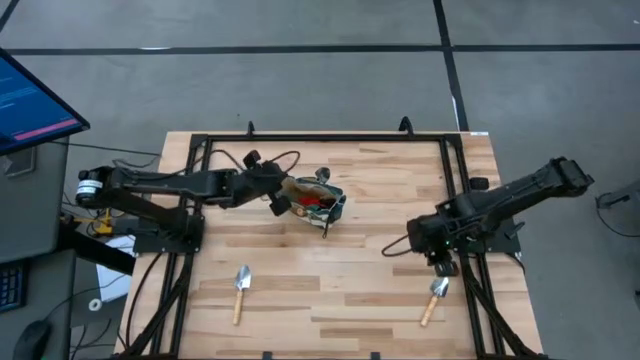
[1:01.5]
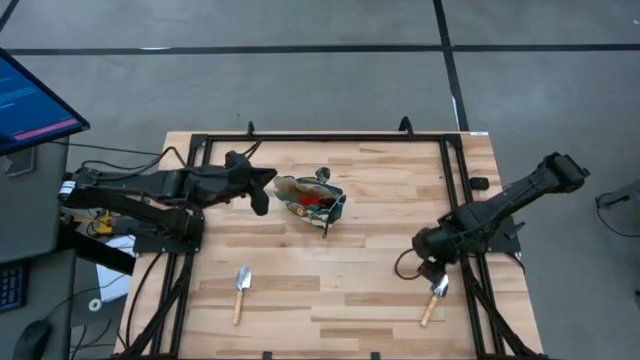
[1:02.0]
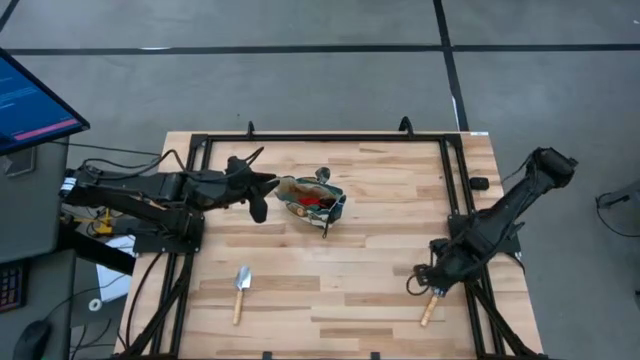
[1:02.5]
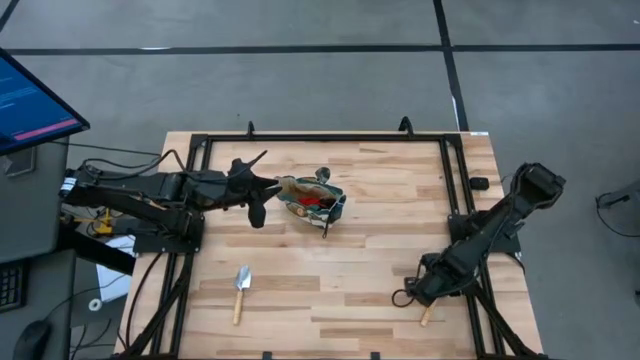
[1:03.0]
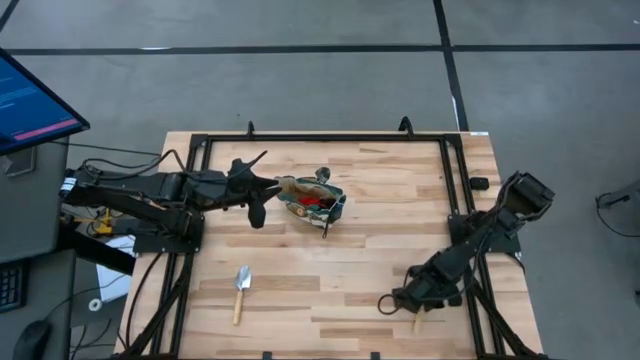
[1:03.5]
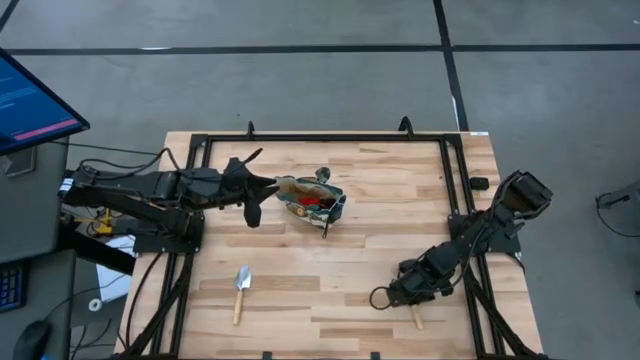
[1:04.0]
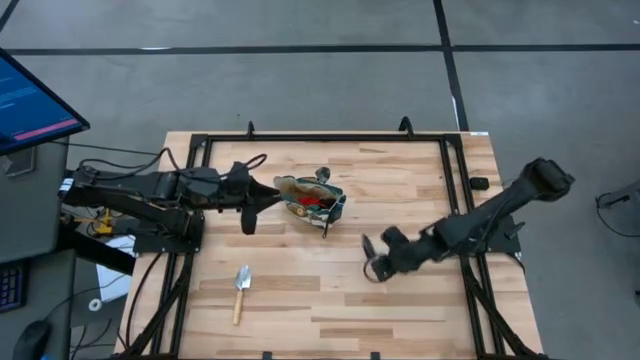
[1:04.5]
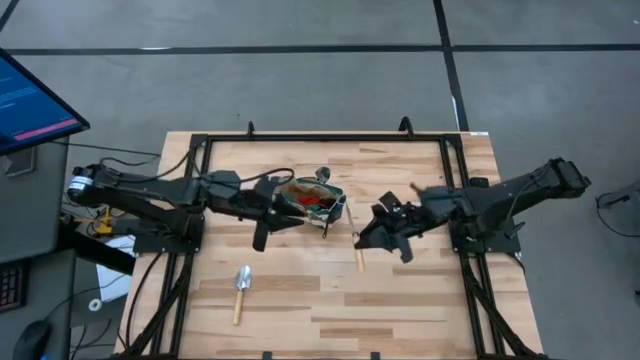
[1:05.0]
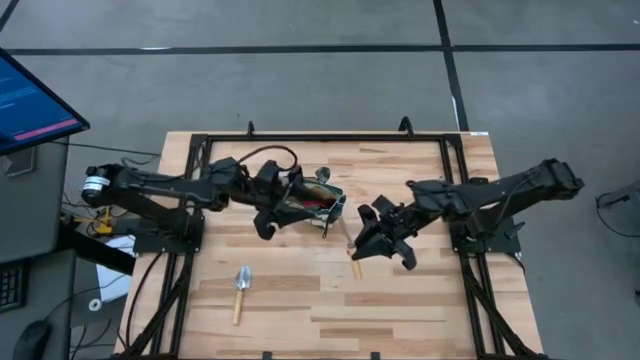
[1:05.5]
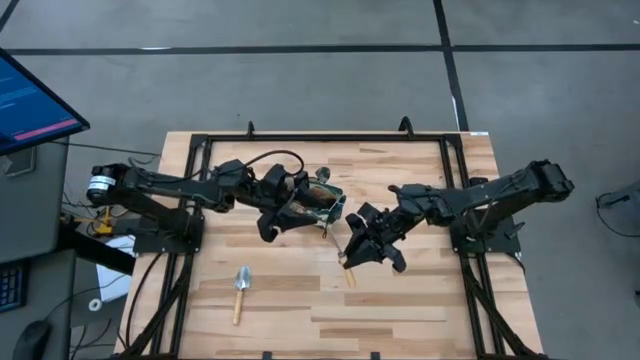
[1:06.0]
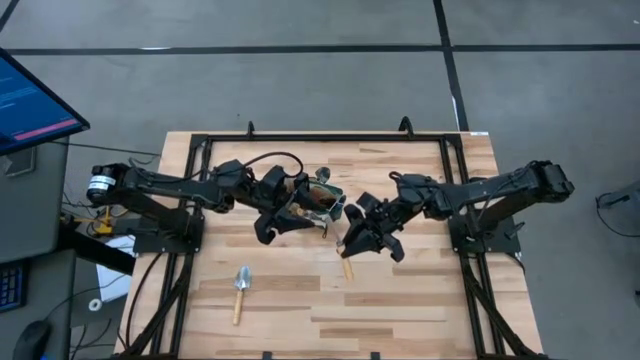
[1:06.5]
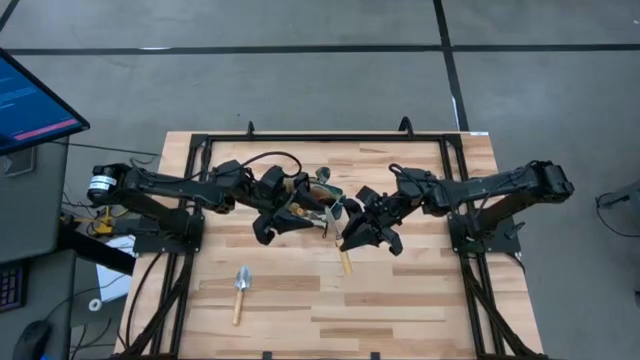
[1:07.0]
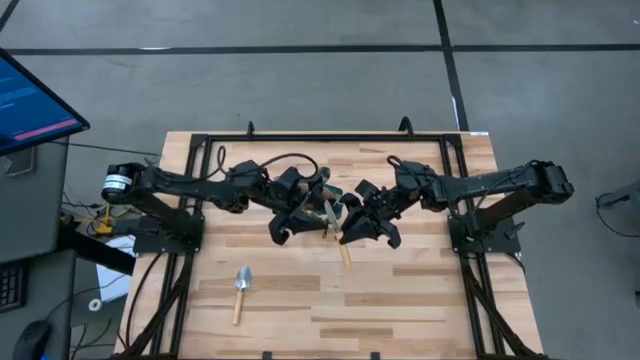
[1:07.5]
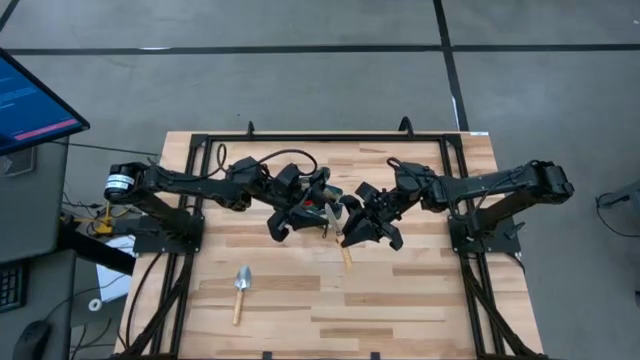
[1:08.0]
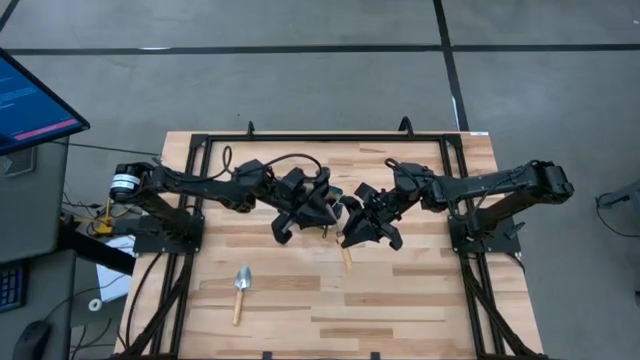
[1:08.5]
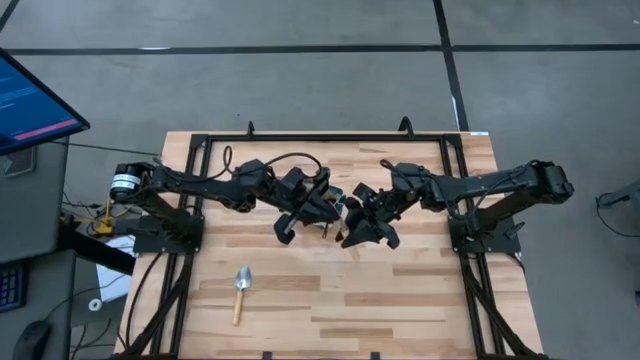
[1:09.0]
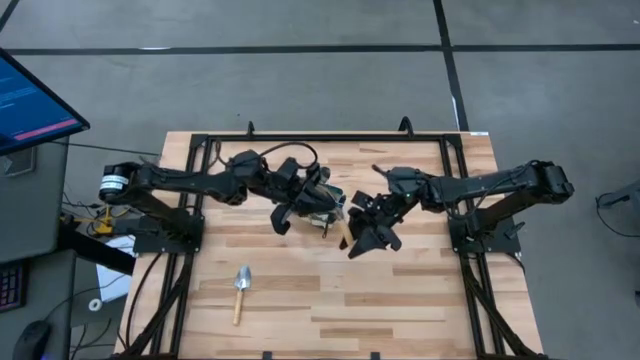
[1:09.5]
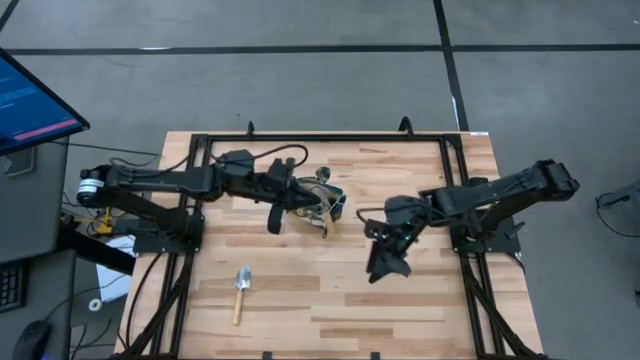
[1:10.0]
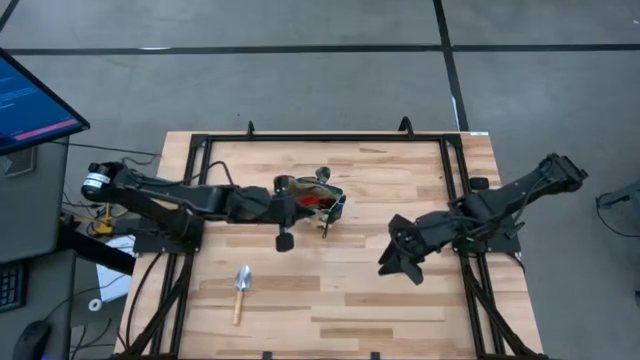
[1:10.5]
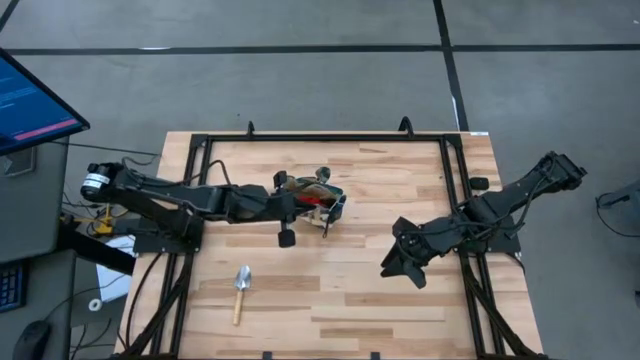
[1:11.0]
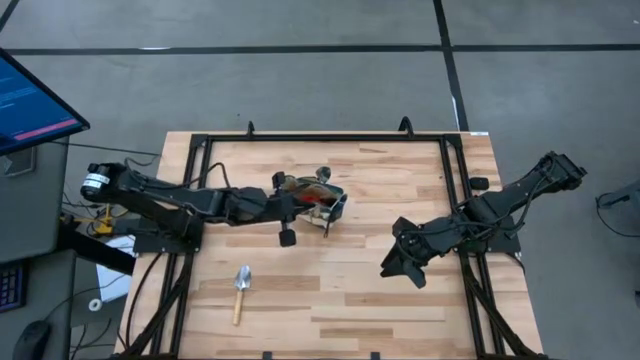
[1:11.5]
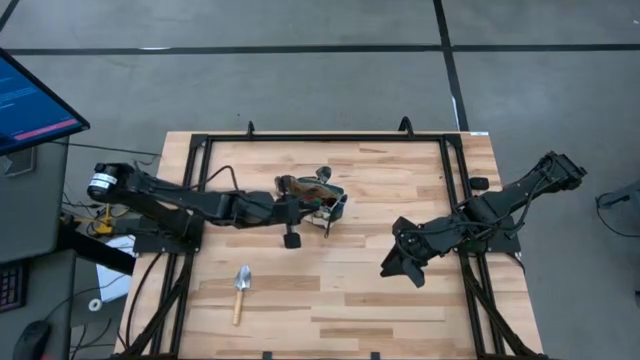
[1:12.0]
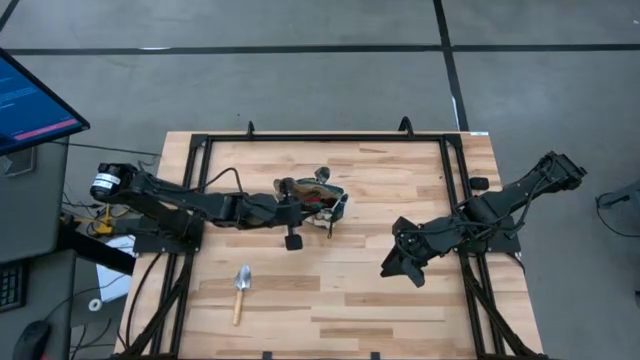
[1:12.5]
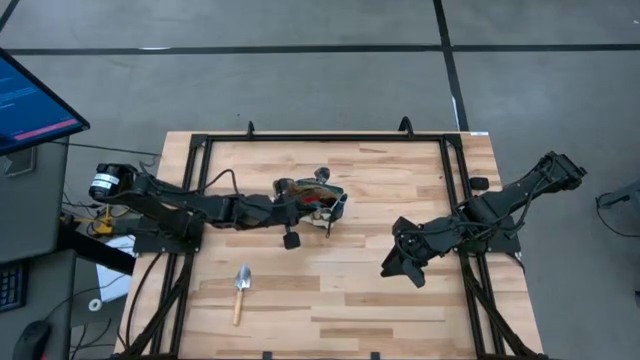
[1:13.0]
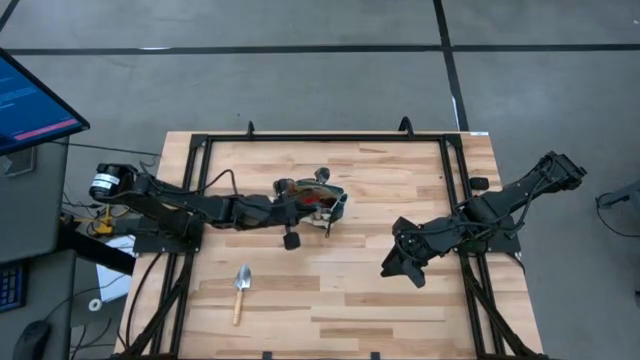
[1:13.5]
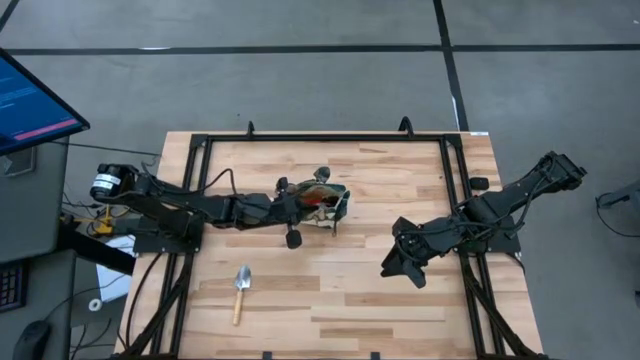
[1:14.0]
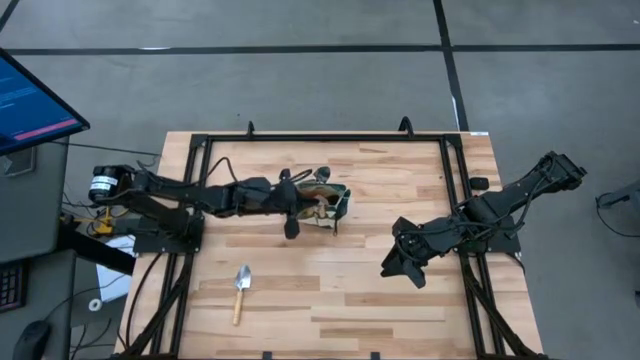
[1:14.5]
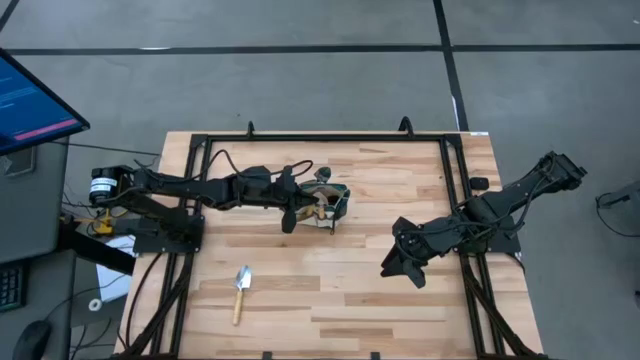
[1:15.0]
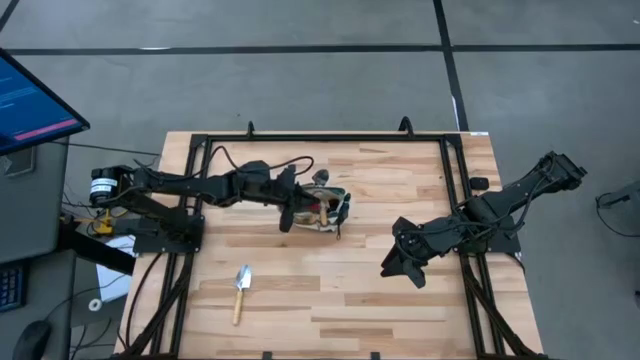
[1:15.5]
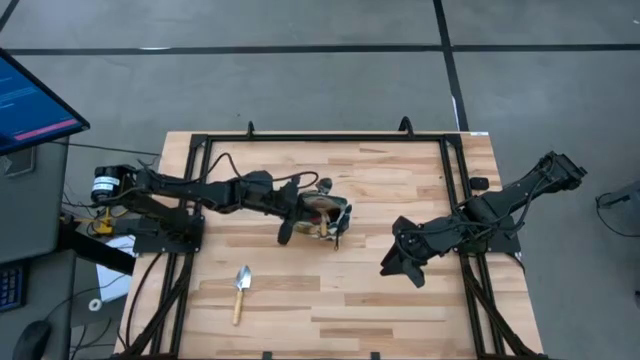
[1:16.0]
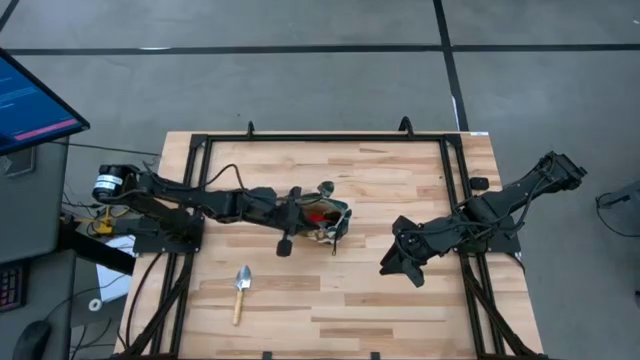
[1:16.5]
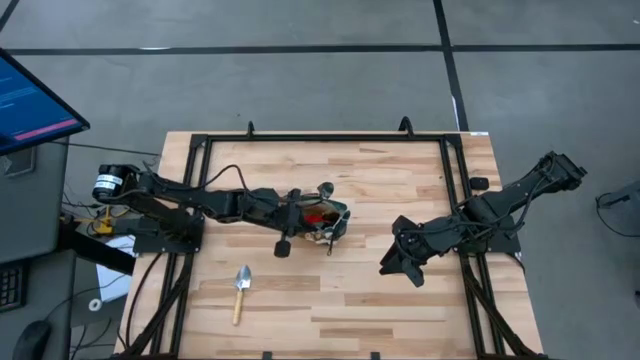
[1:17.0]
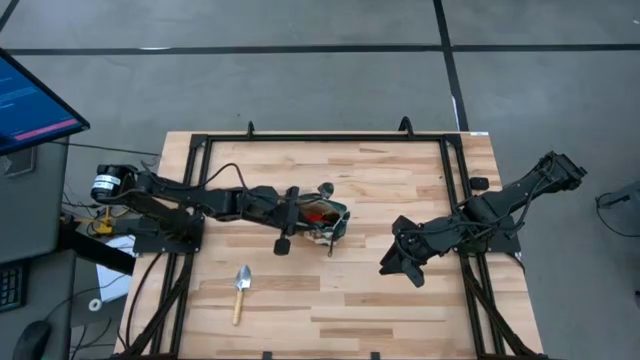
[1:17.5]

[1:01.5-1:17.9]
Task: Pick & Place Garden tools in Gardening bag
Put the brown trowel into the gardening bag

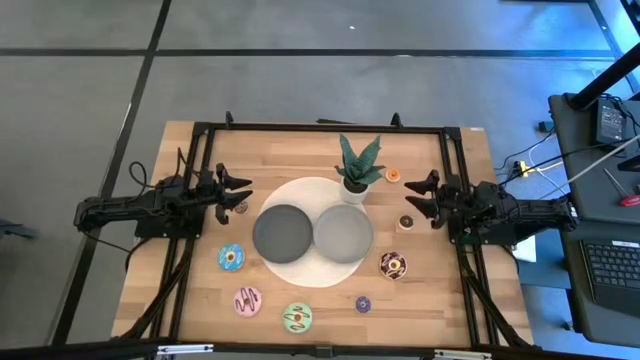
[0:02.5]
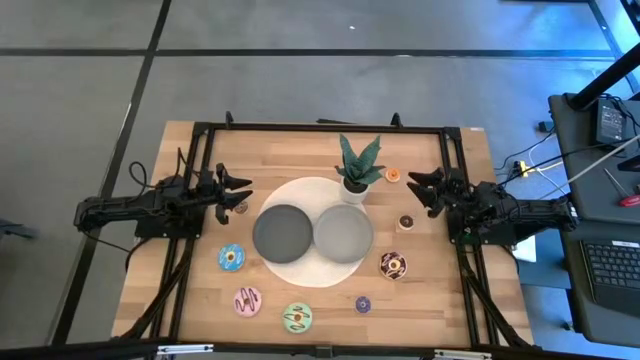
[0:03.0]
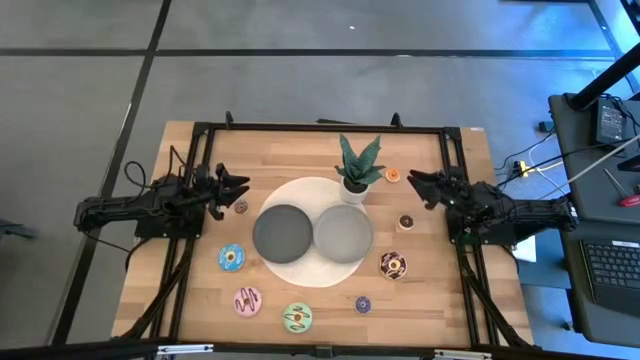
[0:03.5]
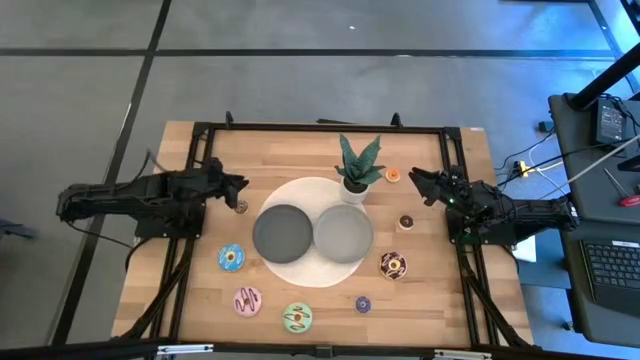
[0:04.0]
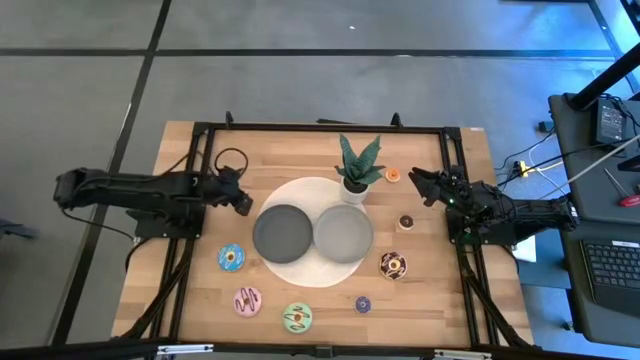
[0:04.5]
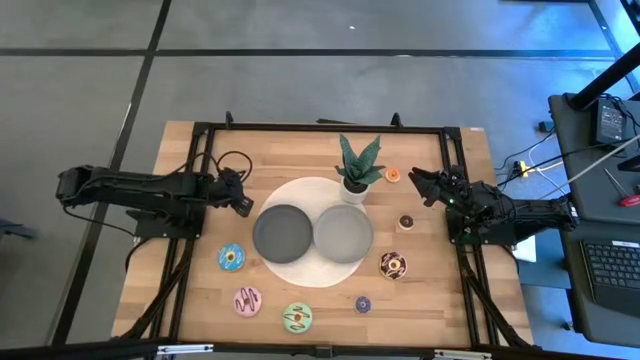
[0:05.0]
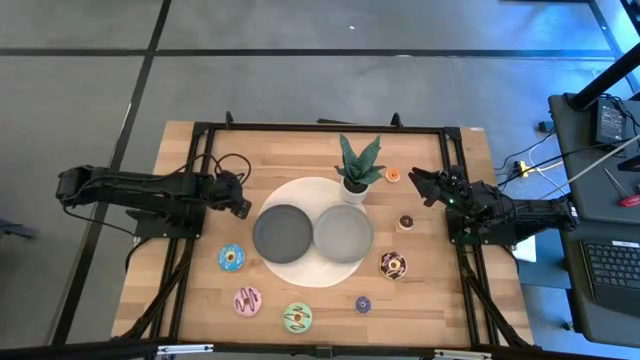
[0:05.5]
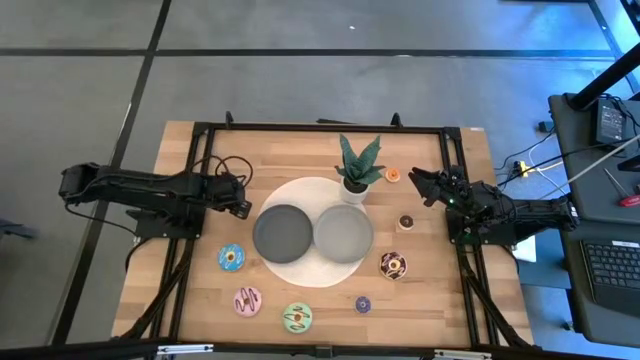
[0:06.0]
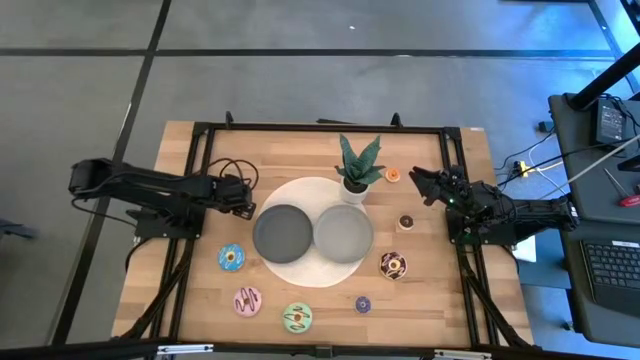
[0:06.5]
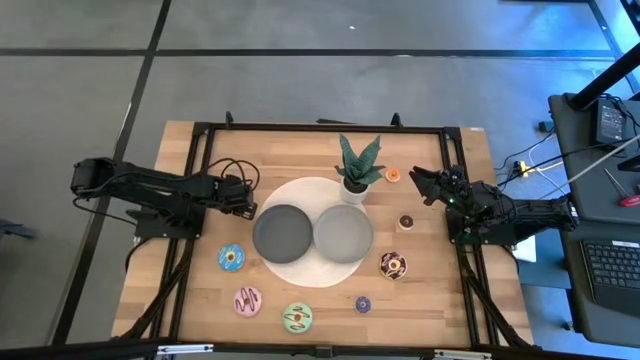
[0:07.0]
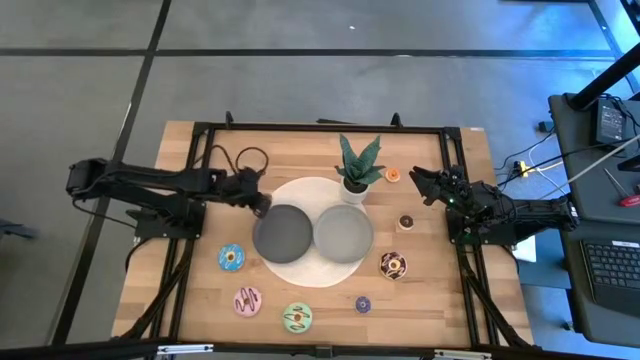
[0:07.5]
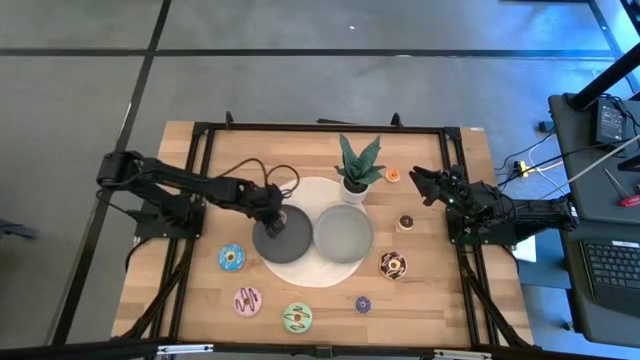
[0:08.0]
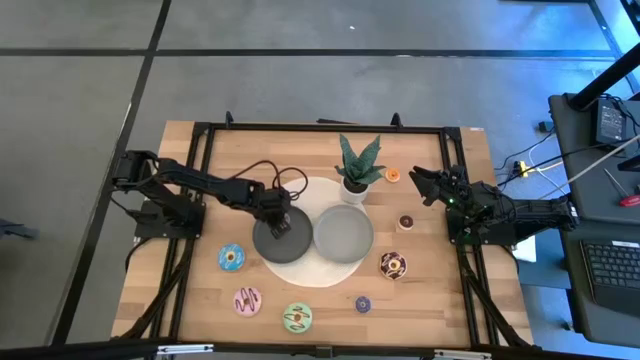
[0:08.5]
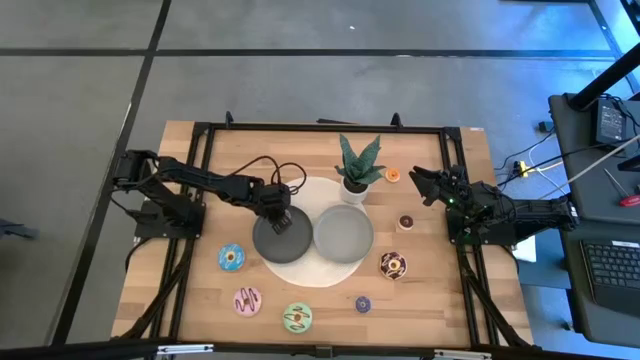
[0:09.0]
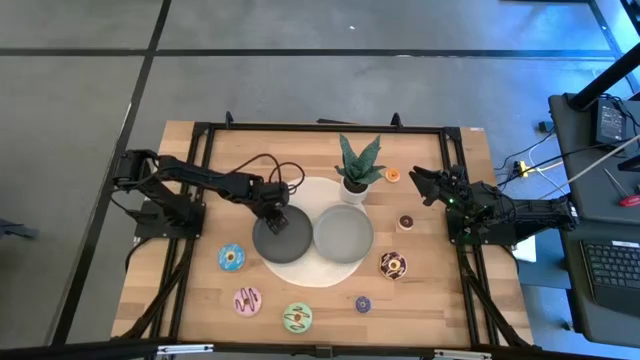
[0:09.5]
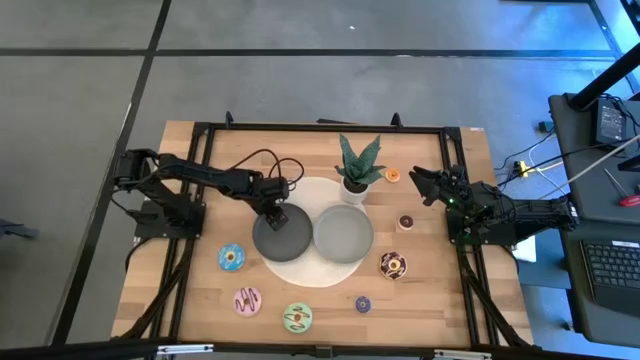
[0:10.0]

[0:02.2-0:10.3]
Task: Pick & Place donuts
Put the small brown doughnut on the dark gray plate
